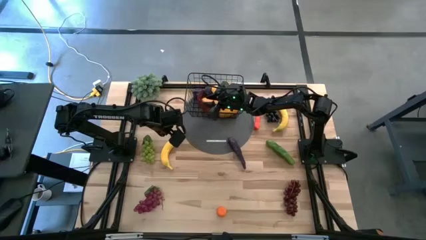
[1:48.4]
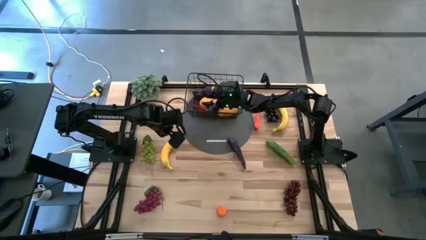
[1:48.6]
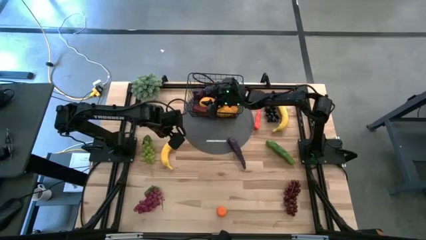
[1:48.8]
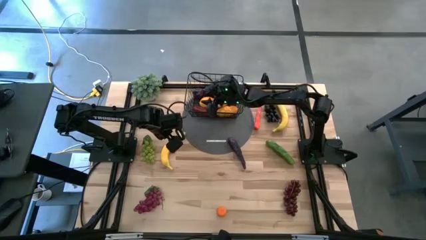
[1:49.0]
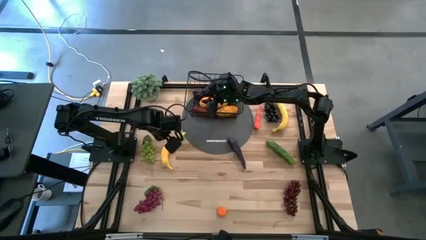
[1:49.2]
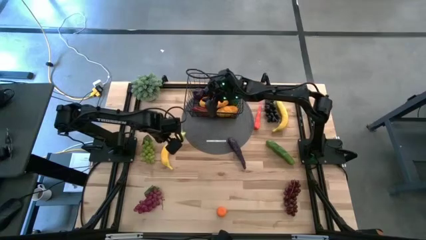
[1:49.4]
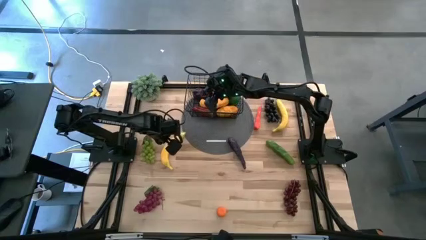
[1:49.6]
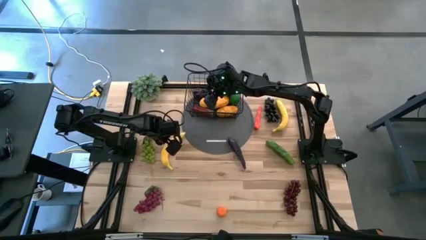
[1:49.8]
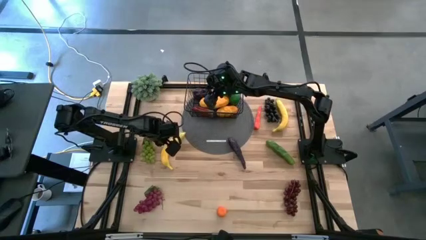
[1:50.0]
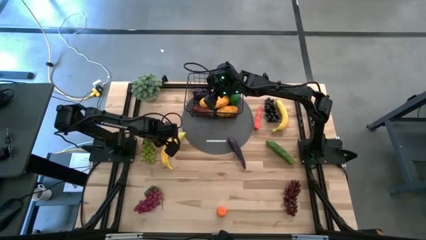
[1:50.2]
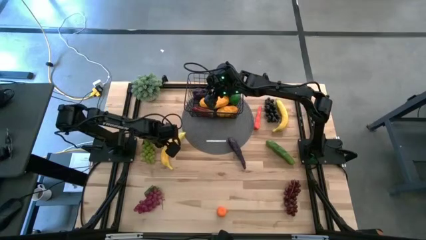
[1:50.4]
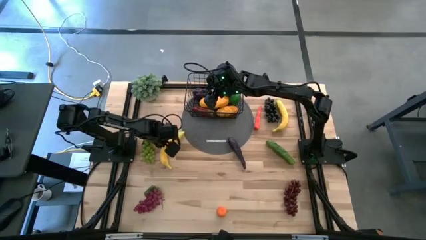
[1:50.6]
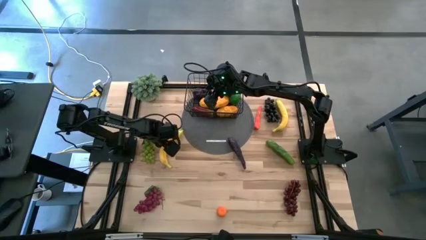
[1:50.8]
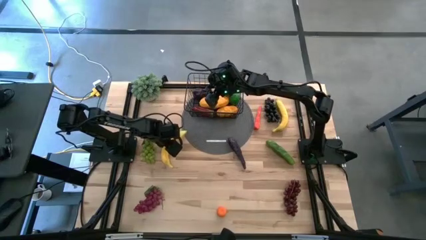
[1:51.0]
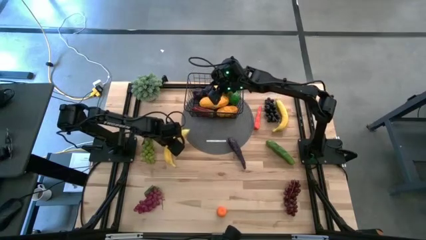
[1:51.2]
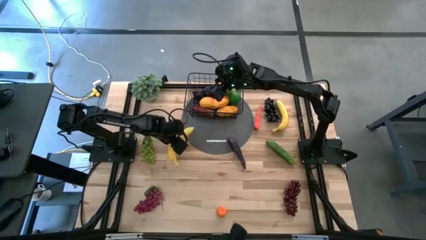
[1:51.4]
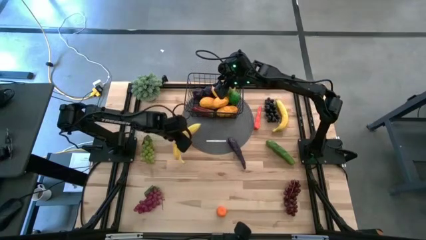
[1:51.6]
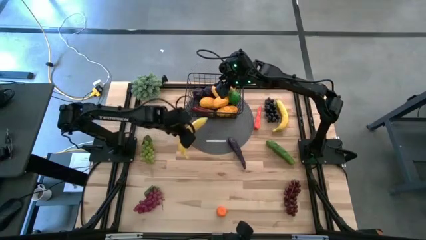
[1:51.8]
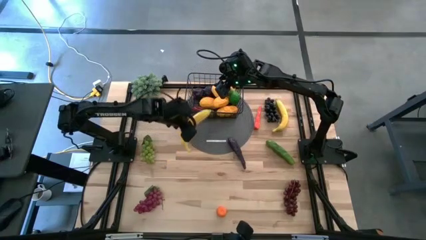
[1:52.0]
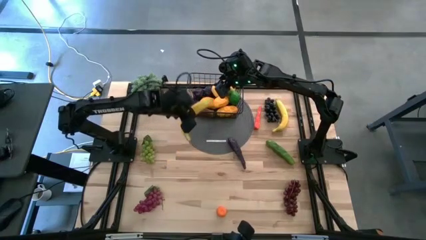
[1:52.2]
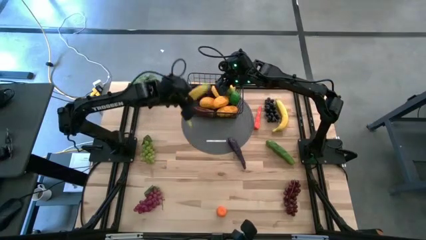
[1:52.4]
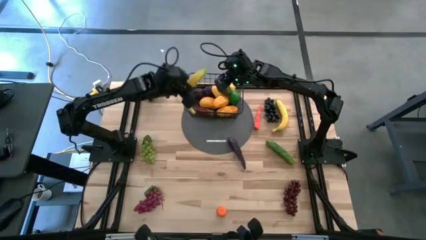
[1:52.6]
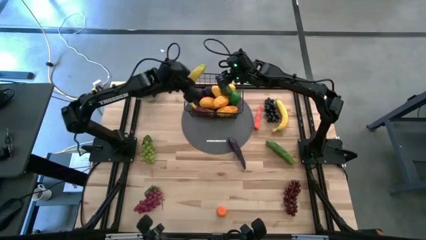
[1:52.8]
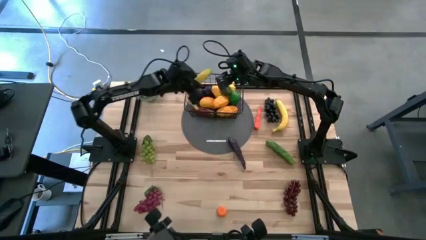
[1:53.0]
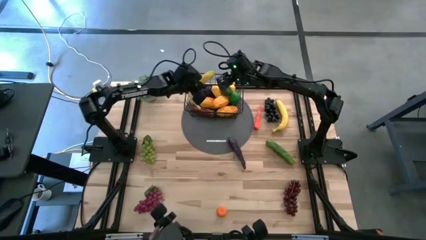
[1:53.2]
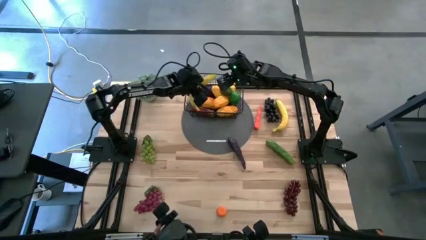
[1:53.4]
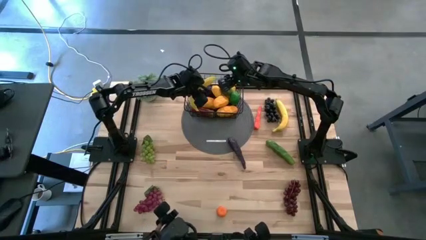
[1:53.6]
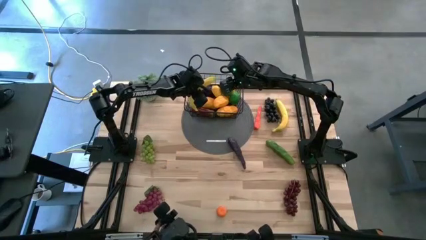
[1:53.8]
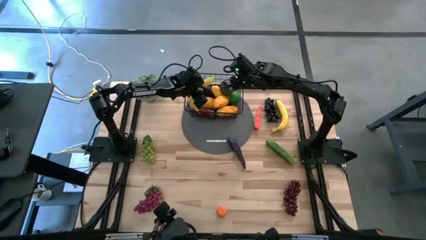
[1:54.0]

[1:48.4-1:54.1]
Task: Build produce basket
Put the banana into the black wire basket

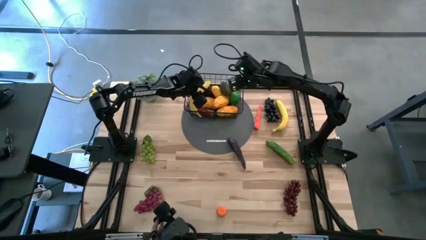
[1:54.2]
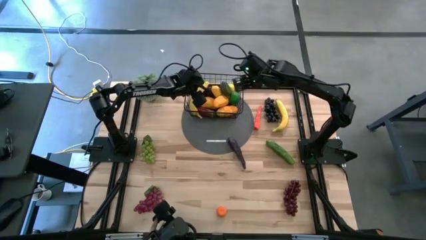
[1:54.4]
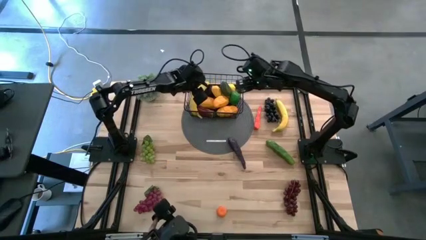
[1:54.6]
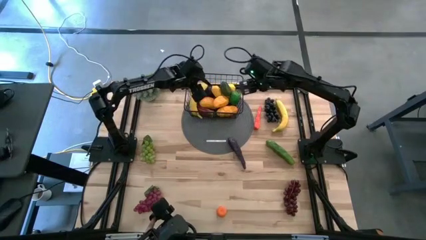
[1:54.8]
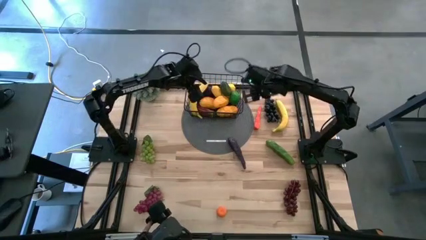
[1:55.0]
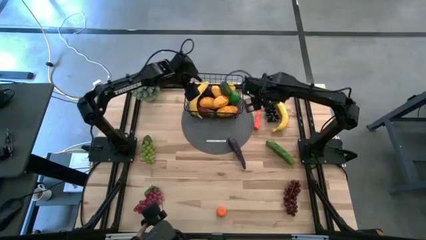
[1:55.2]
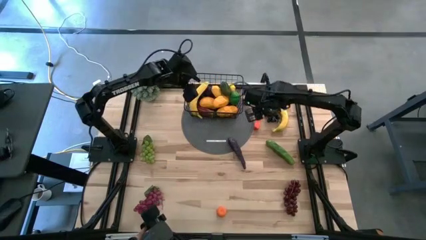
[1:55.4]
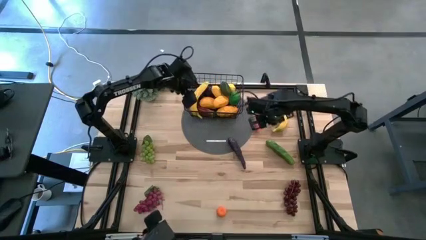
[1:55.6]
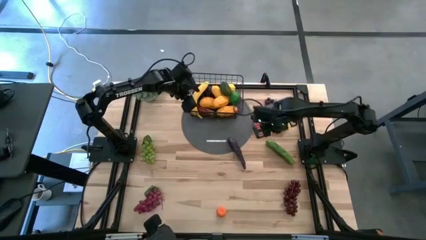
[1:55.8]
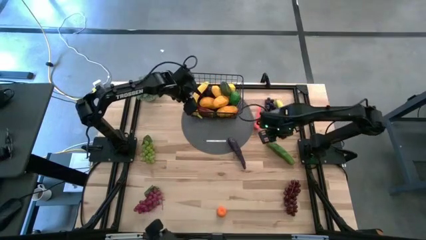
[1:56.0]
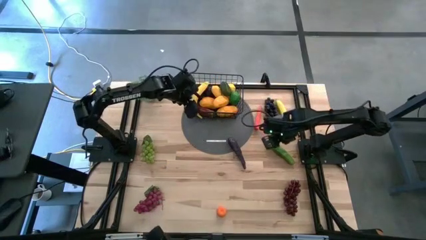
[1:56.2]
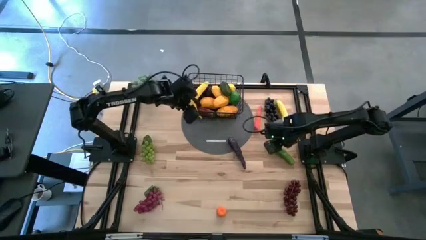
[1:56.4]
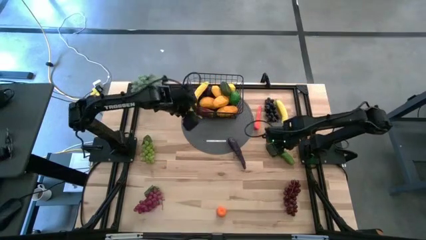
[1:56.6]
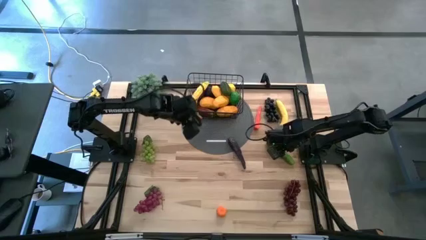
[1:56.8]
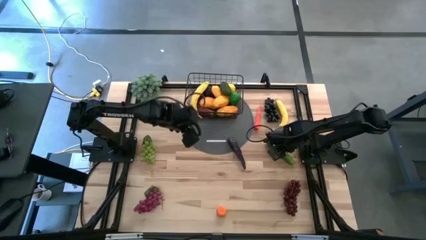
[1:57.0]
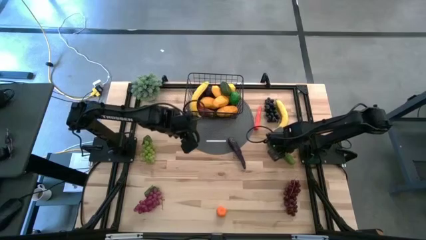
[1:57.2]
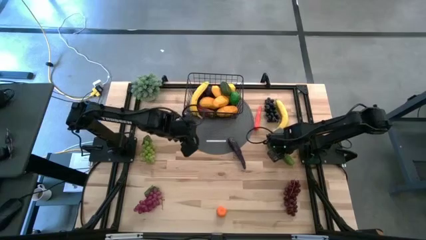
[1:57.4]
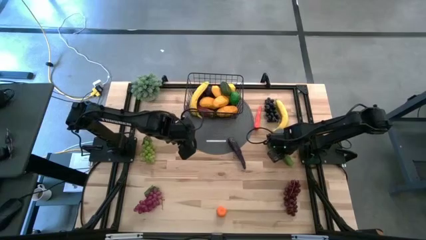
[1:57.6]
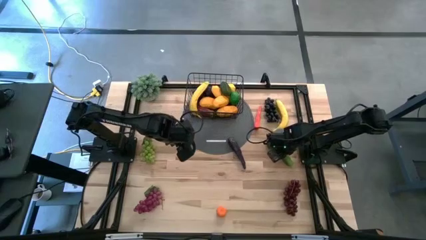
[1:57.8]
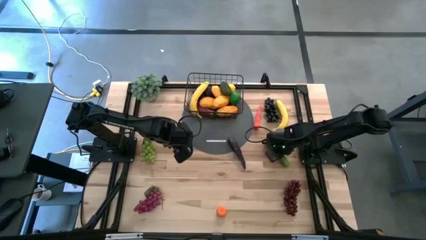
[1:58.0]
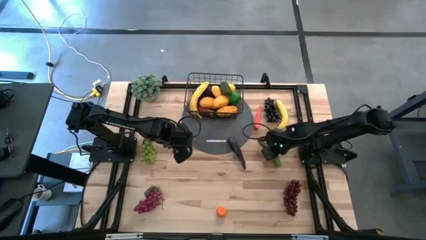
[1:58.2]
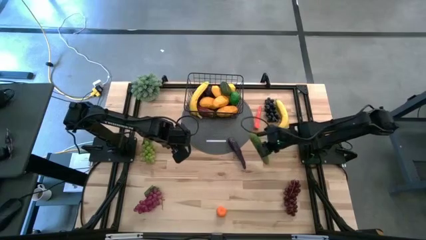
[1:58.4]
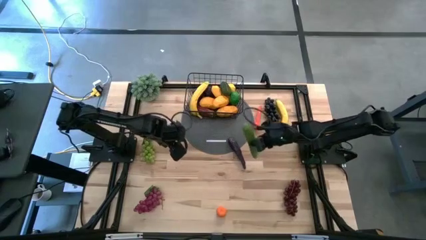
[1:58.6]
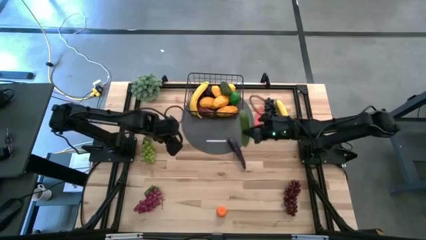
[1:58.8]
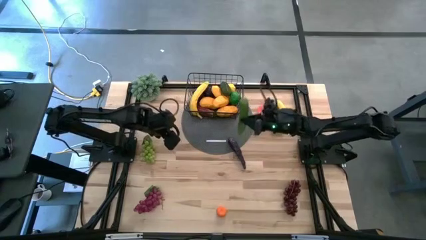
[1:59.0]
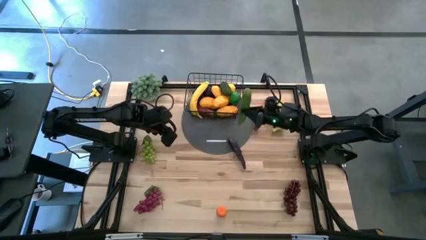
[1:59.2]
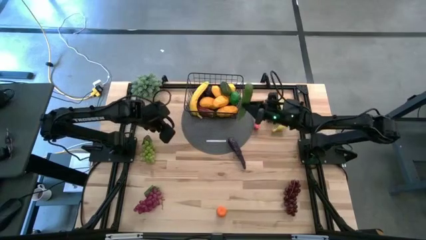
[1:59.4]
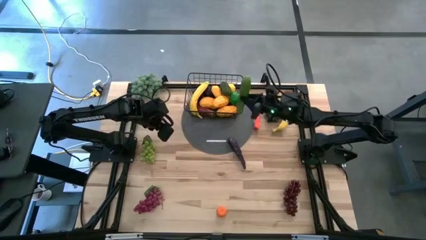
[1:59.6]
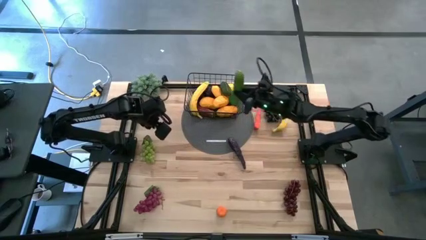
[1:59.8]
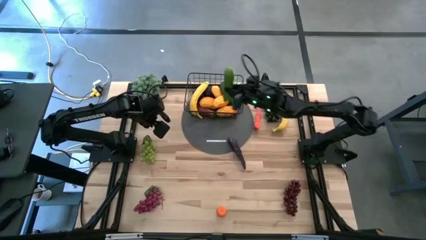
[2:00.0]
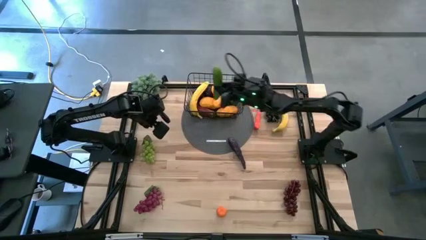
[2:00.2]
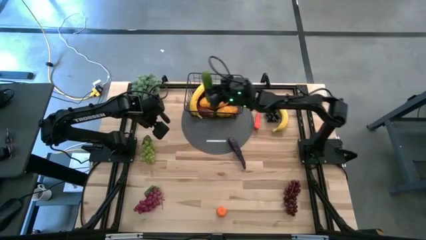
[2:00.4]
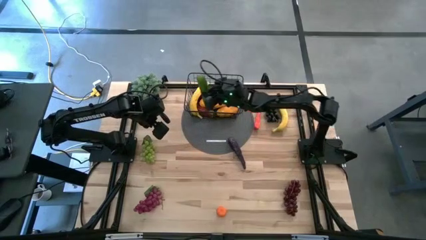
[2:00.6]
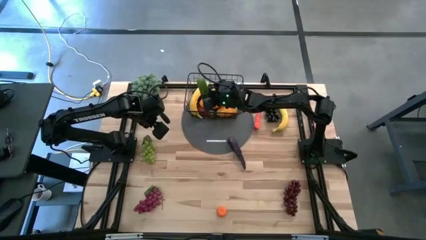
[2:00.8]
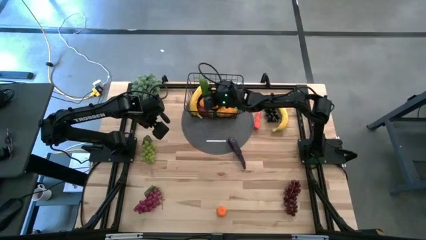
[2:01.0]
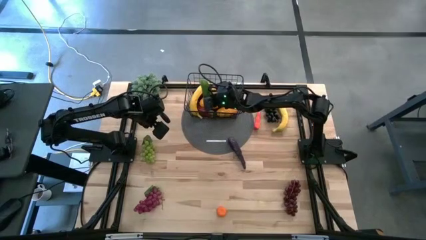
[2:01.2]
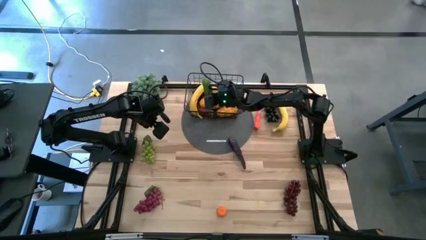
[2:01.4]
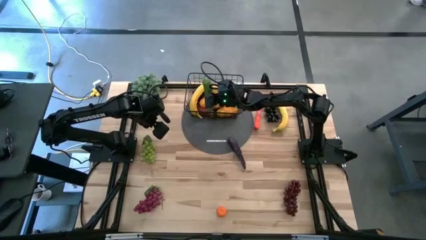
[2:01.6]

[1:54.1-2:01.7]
Put the cucumber into the black wire basket

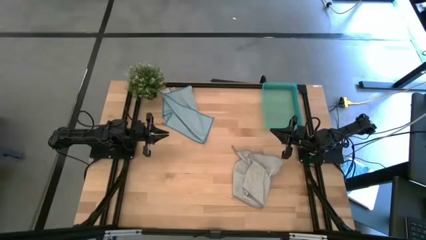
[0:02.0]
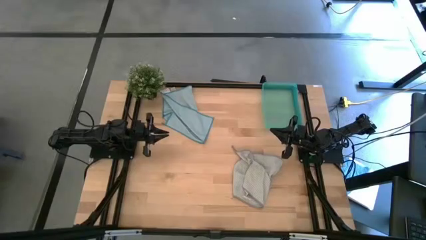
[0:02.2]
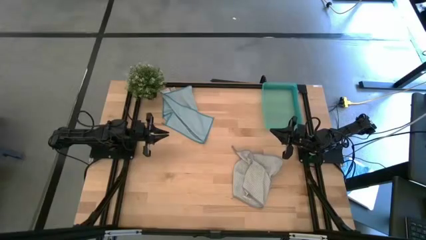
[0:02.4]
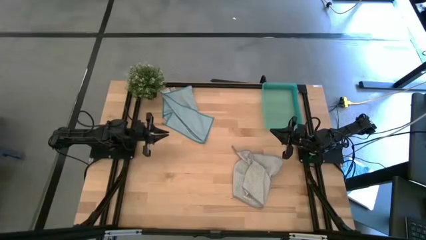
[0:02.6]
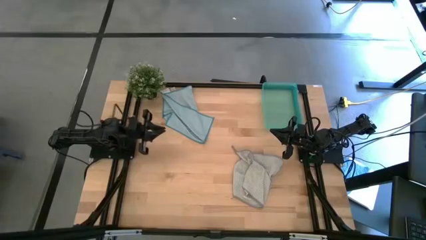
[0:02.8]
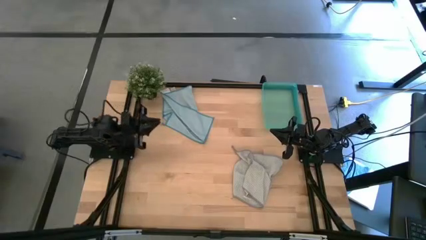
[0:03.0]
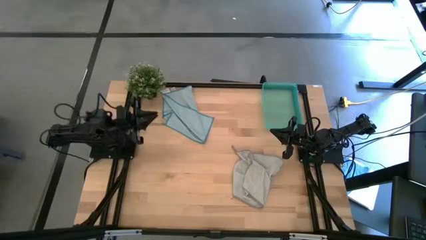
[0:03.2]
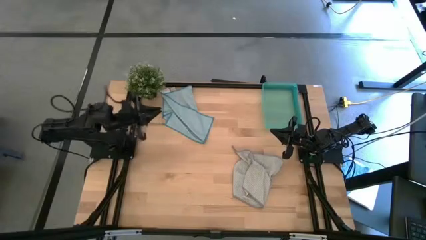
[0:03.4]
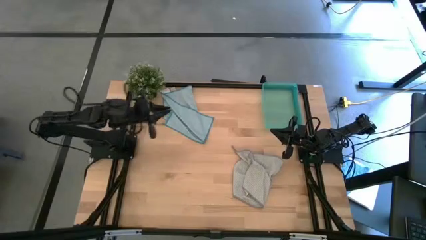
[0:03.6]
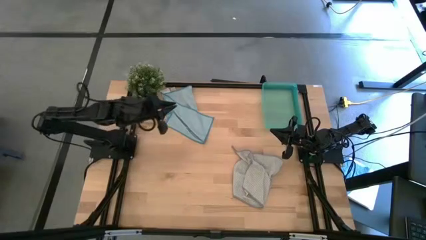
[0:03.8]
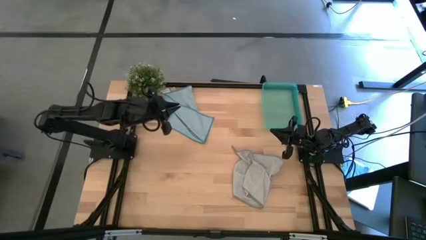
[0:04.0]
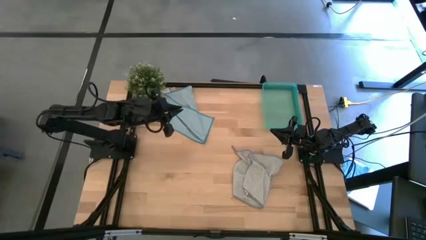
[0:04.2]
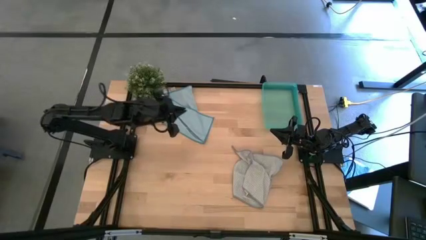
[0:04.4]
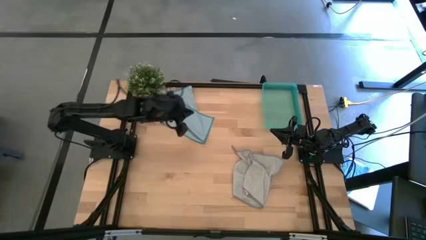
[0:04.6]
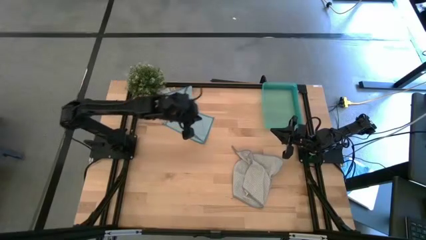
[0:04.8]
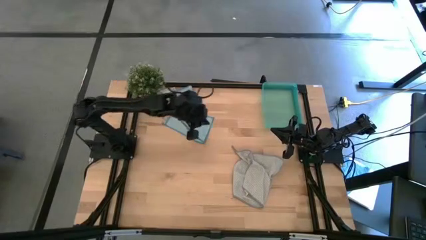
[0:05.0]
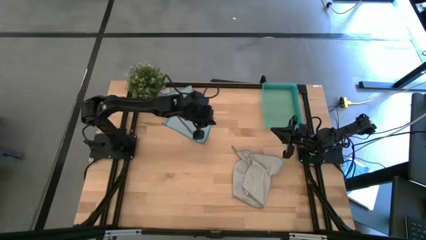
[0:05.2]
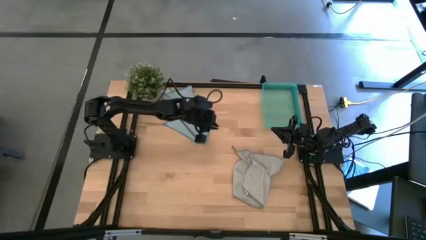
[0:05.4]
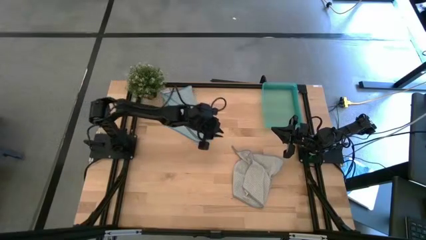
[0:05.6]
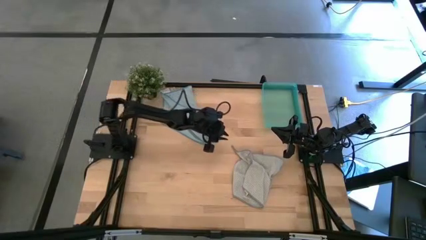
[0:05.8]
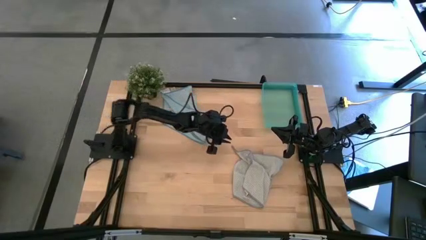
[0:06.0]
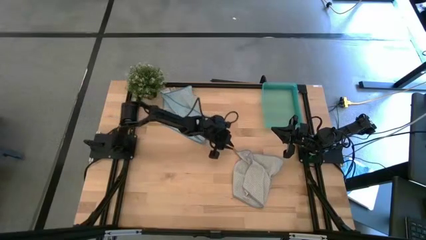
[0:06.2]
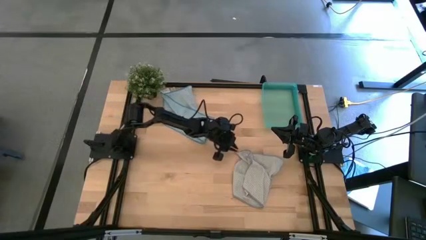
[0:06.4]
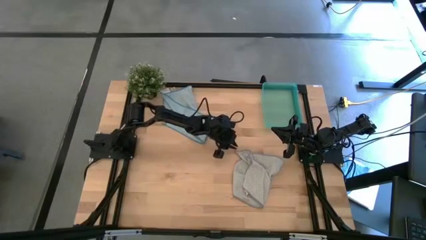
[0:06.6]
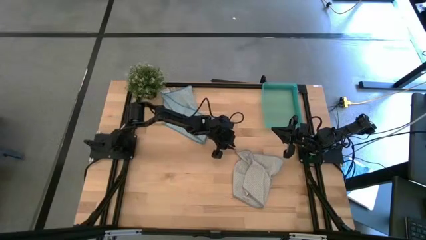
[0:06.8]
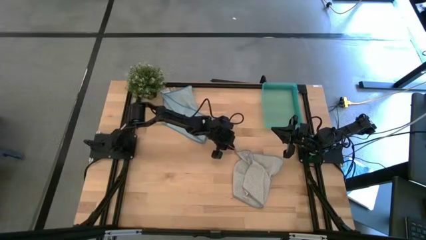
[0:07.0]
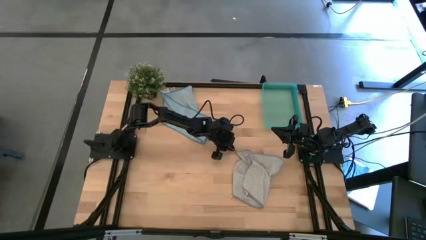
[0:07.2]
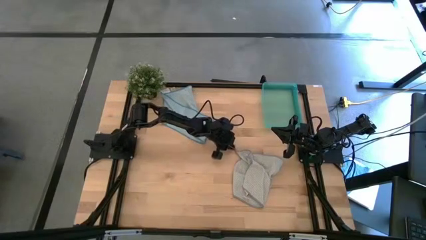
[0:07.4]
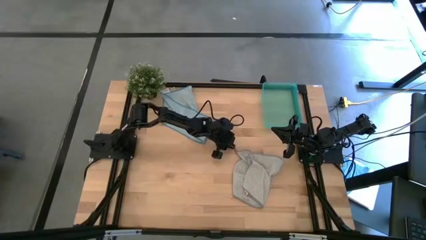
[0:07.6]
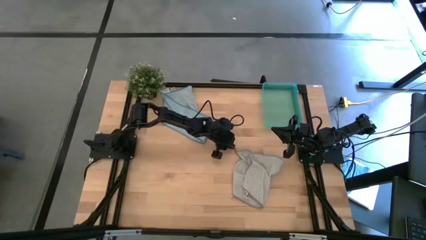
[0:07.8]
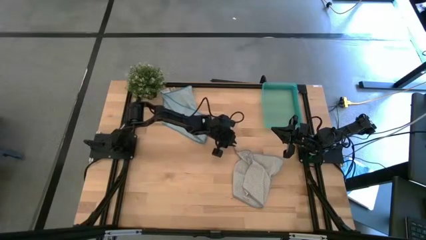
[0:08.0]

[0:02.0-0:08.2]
Task: Roll microfiber towels into tight, uniform cylinder then place into a basket
Put the towels into the green bin
